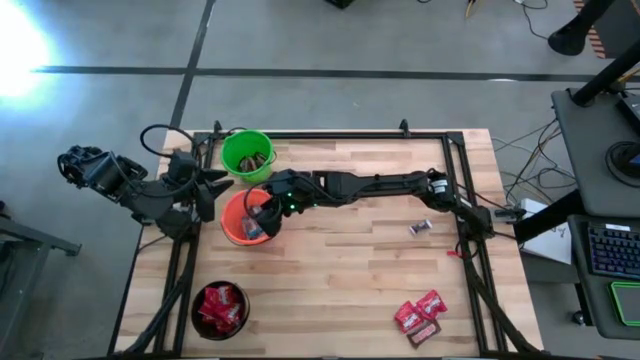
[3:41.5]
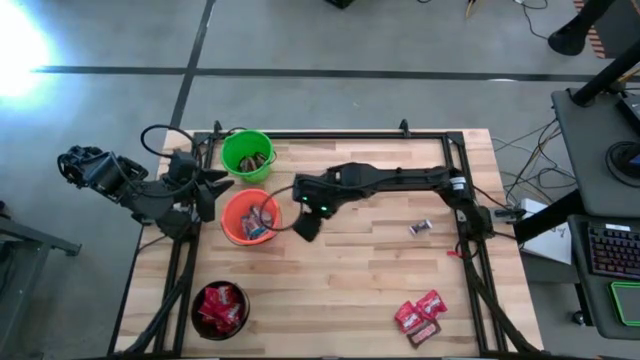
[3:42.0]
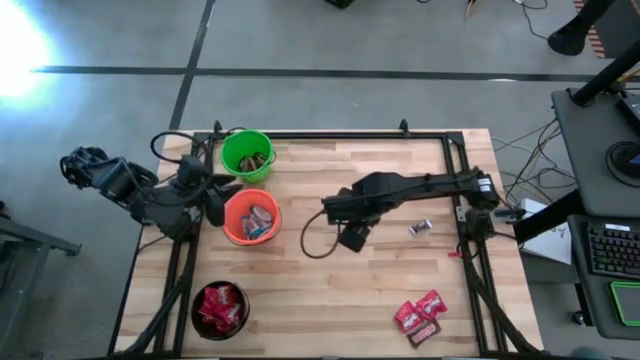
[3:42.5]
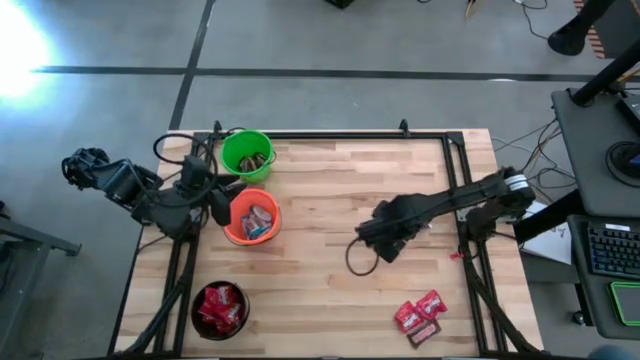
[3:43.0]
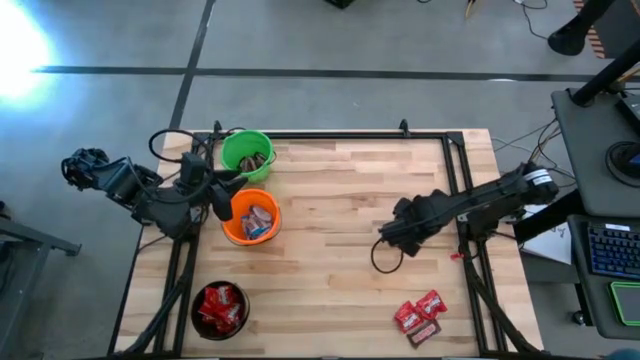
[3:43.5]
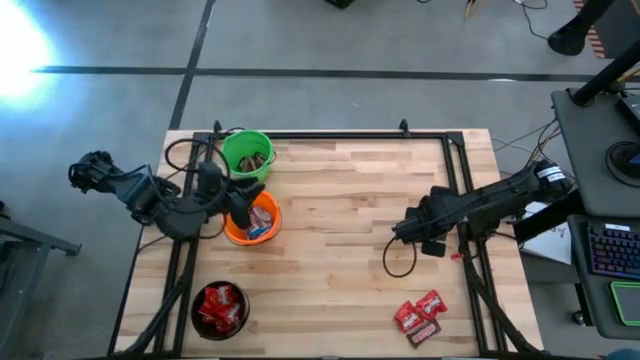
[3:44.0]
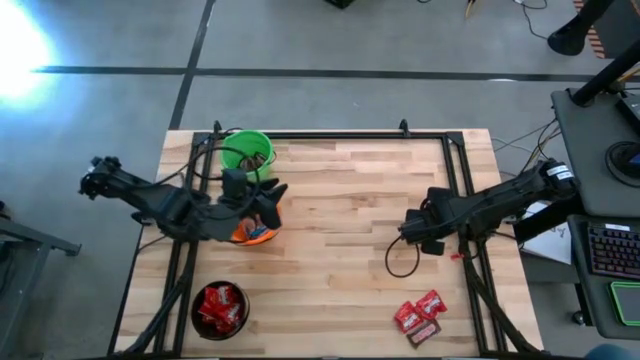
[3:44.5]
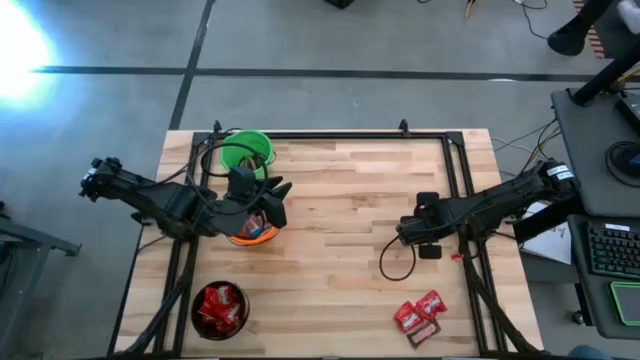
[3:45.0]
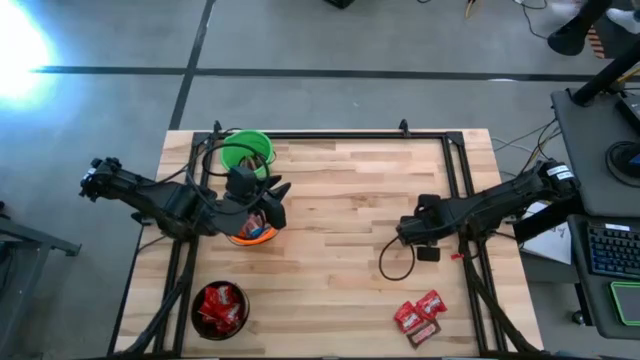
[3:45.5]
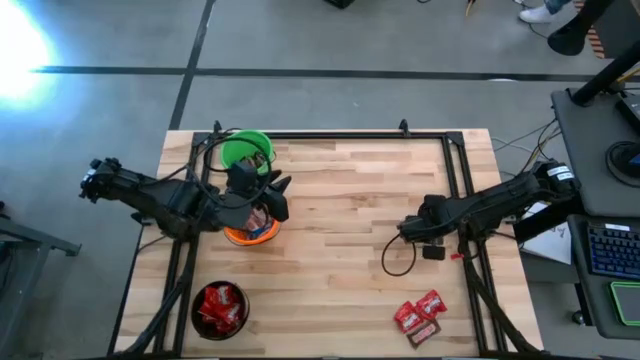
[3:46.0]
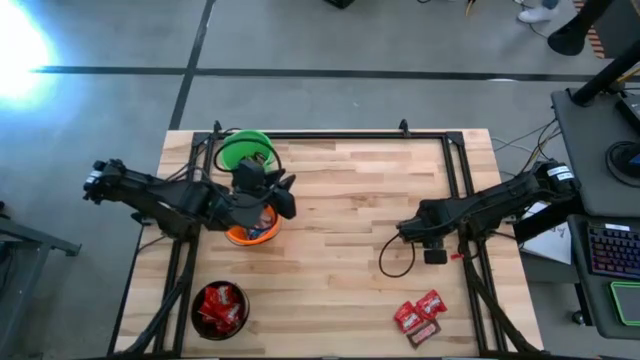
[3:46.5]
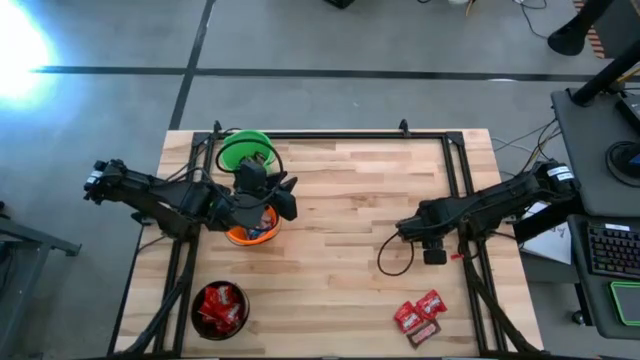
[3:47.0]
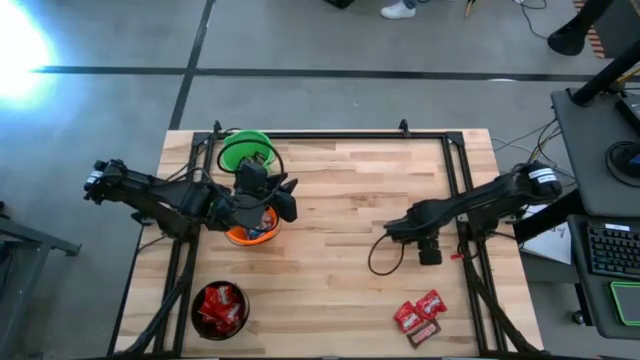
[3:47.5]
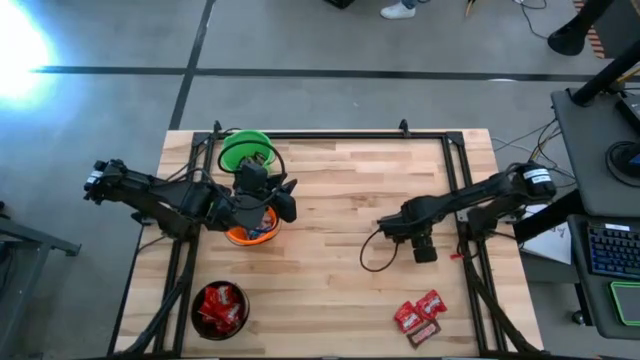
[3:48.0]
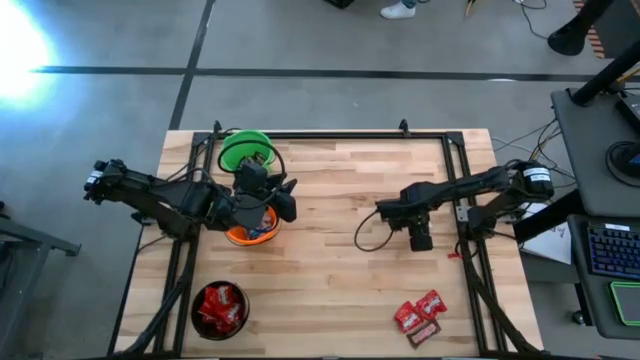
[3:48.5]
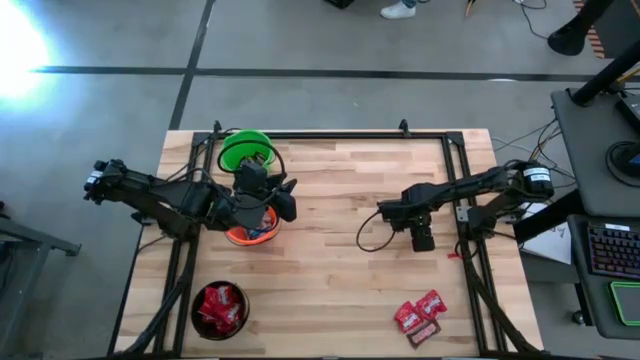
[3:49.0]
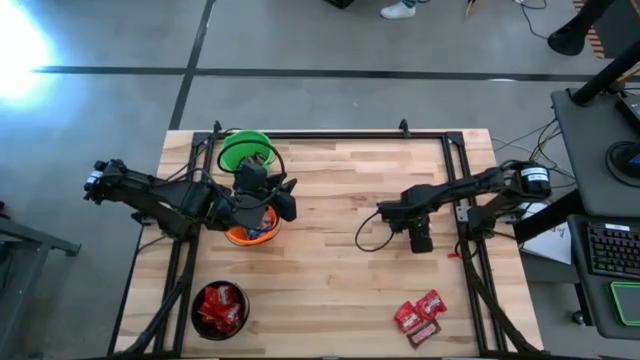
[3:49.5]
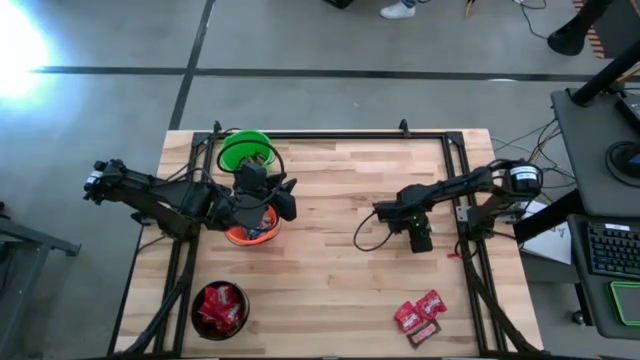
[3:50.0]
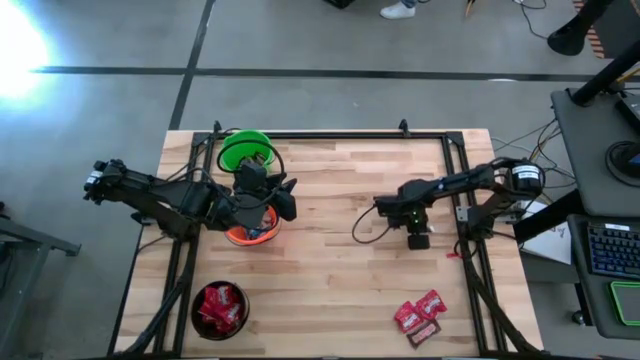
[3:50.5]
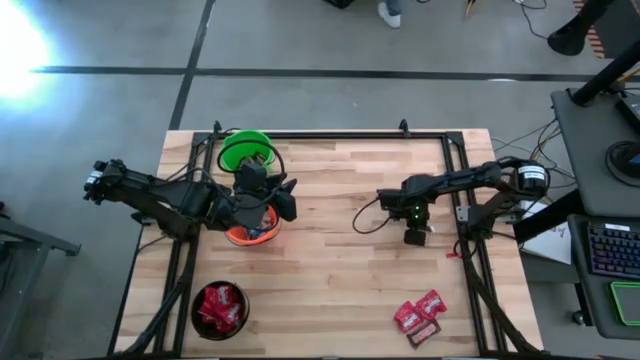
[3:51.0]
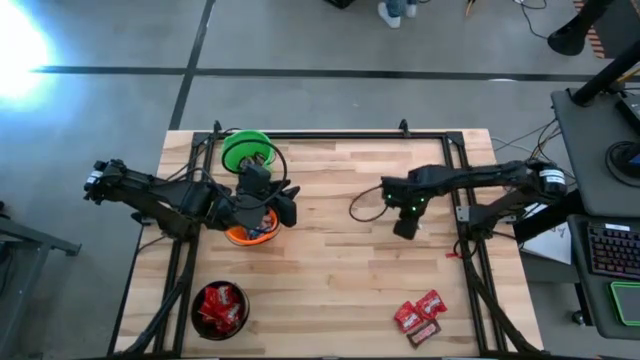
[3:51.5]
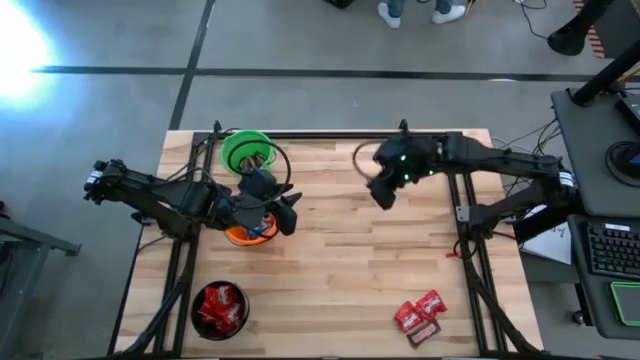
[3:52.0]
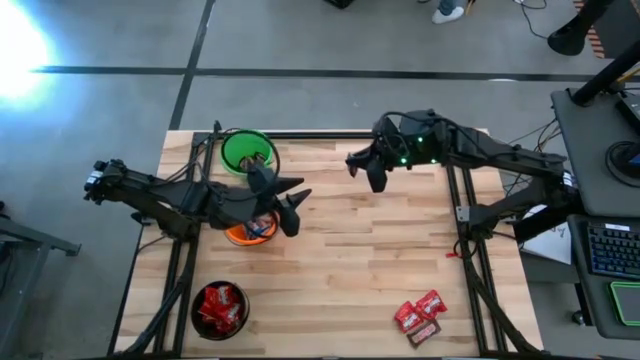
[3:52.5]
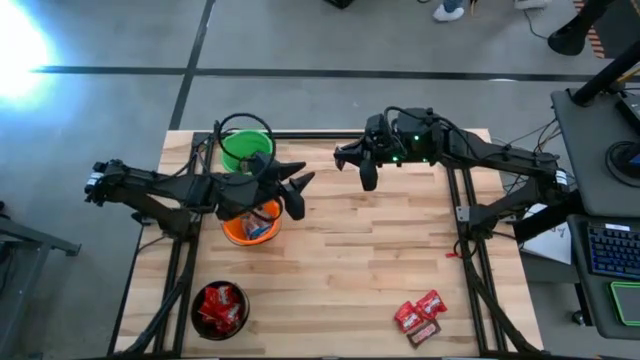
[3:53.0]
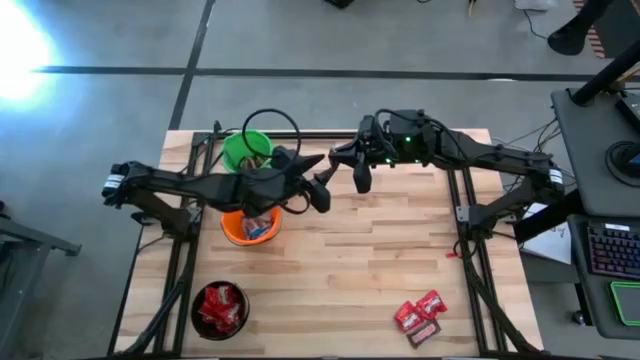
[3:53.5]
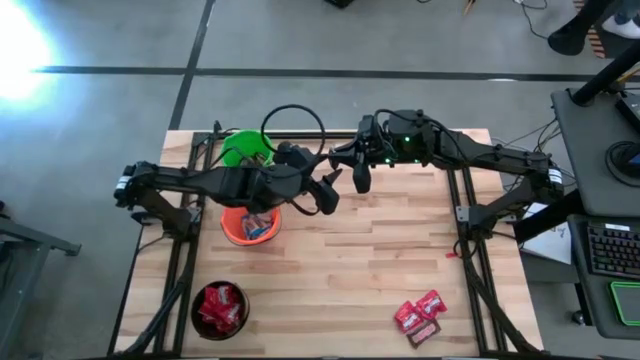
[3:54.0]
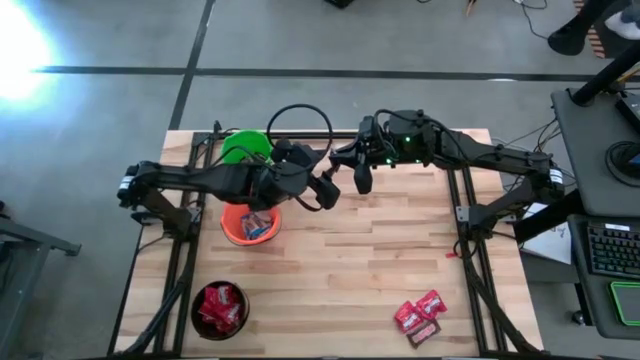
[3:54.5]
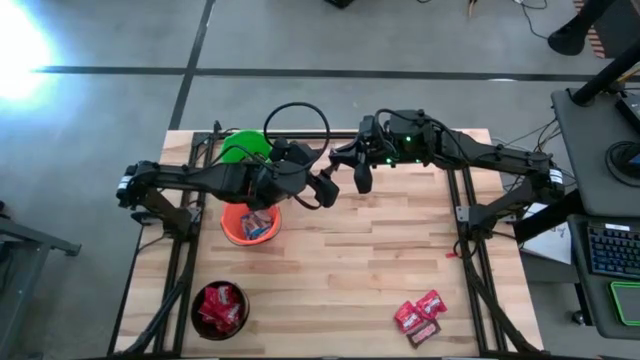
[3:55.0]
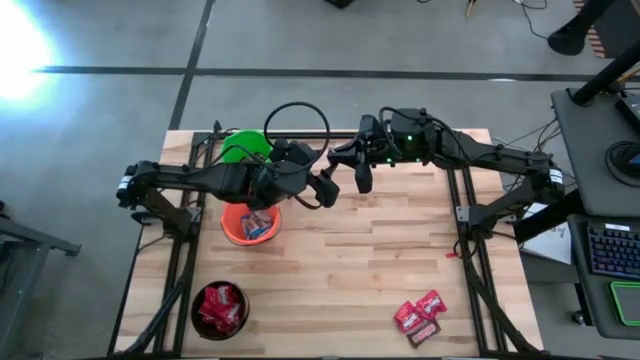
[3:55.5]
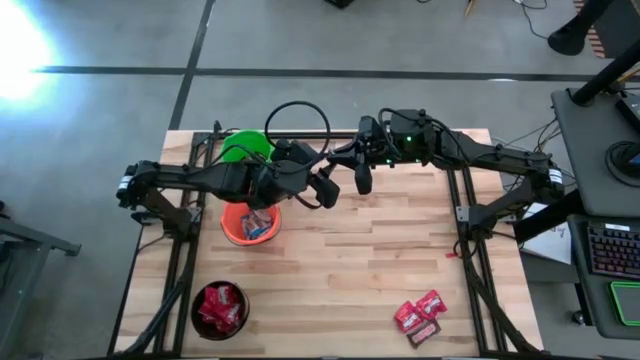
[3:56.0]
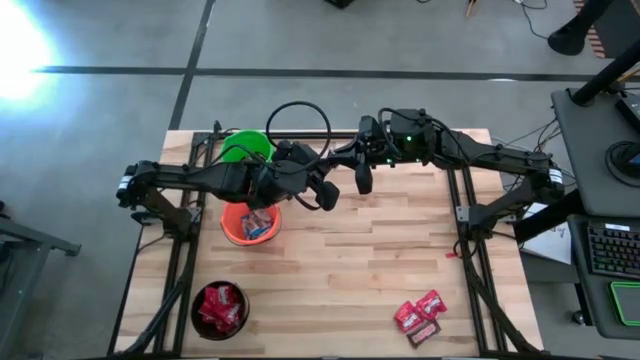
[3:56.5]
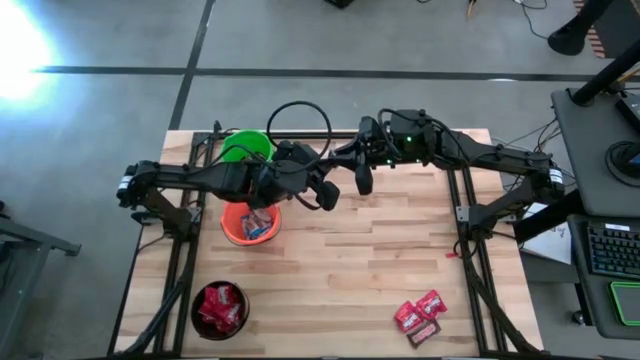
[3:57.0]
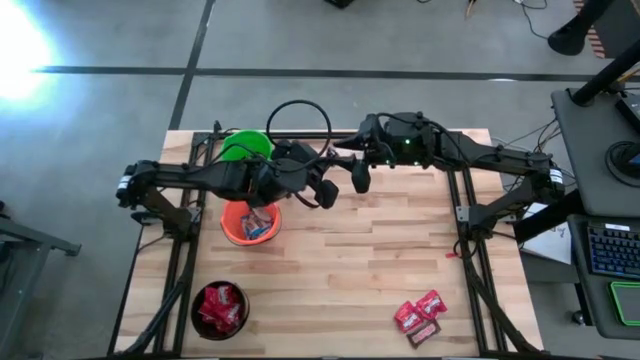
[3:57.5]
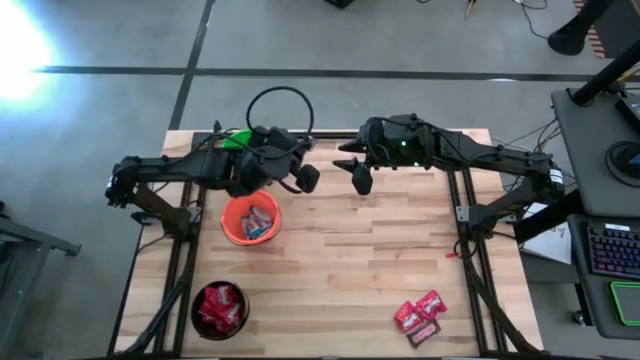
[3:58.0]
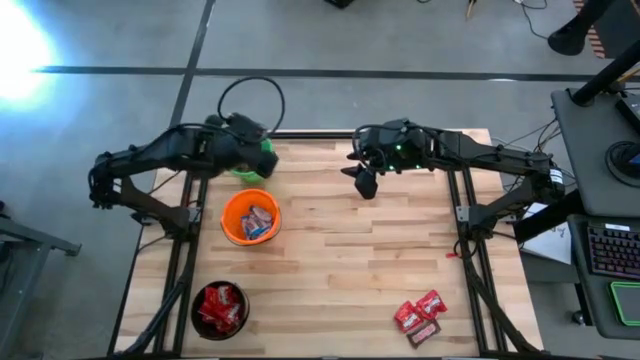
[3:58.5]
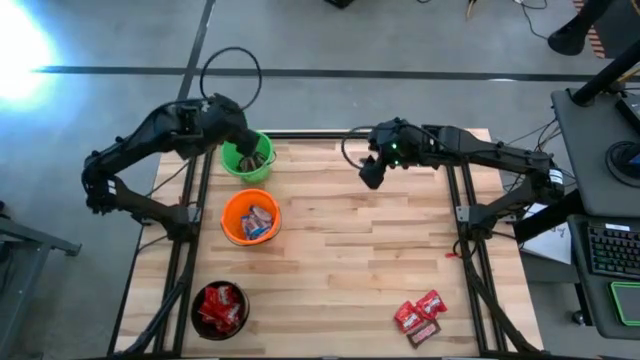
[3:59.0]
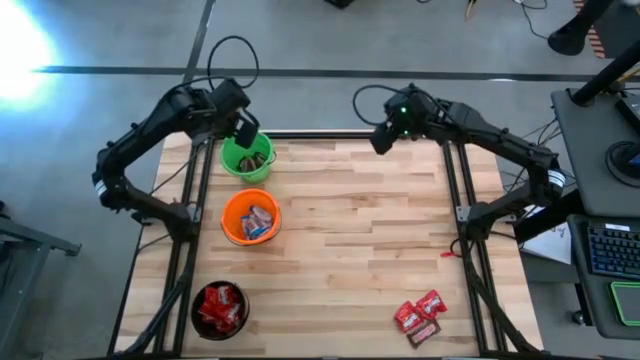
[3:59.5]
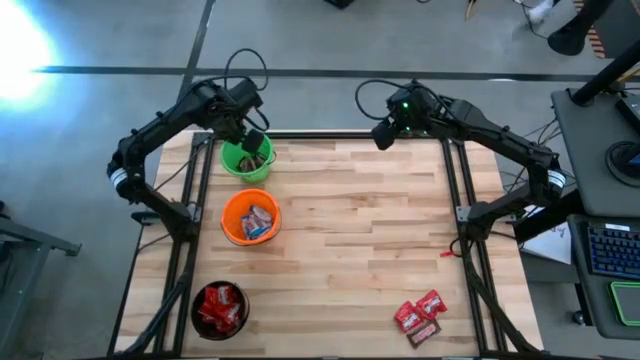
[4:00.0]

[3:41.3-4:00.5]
Task: Organize candy in baskets
Put the brown chocolate into the green bucket
